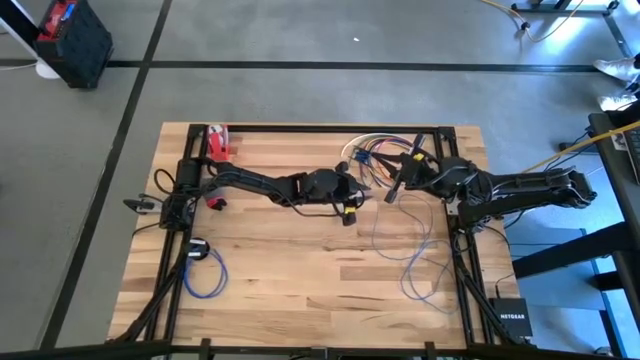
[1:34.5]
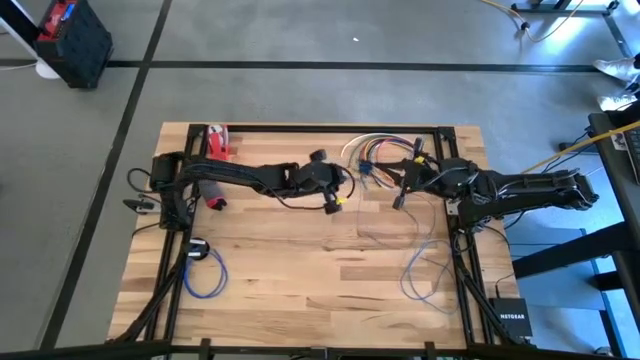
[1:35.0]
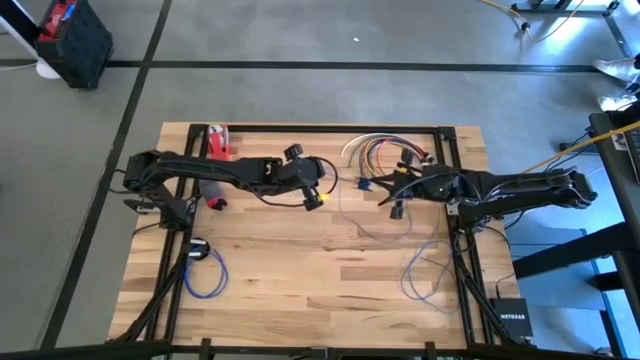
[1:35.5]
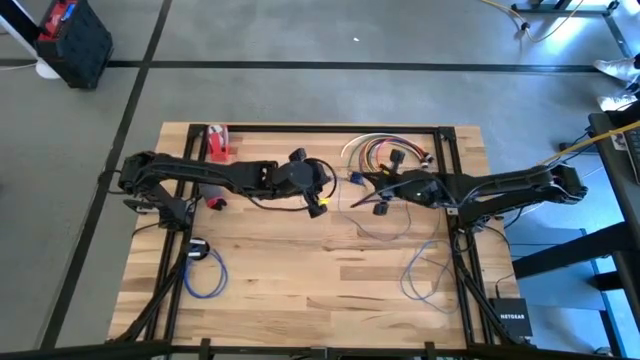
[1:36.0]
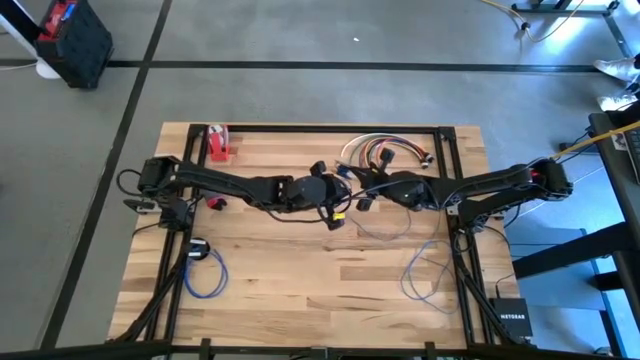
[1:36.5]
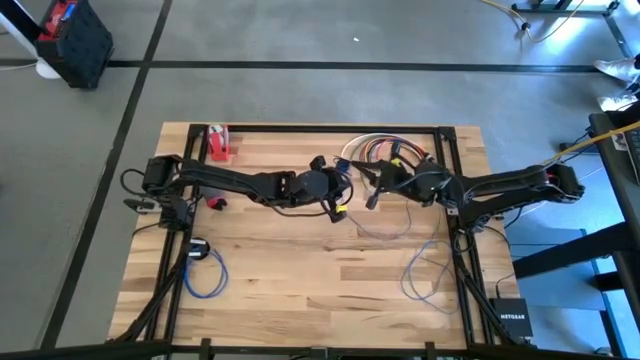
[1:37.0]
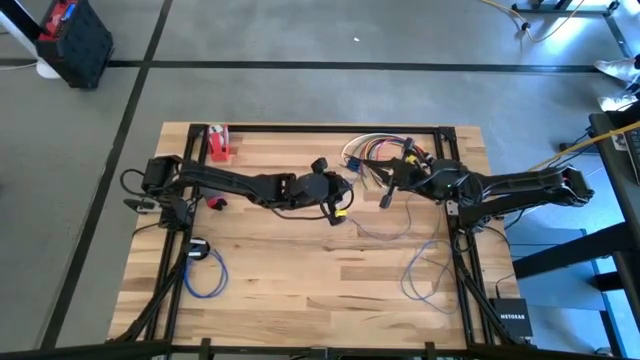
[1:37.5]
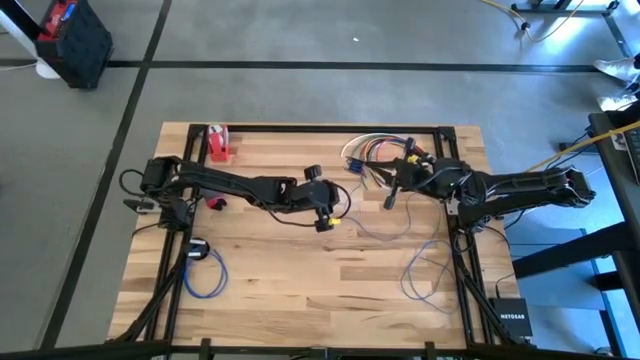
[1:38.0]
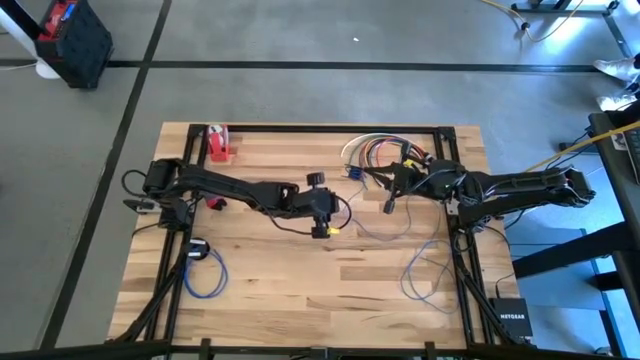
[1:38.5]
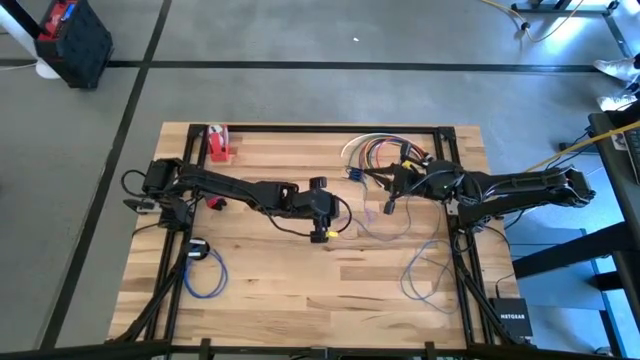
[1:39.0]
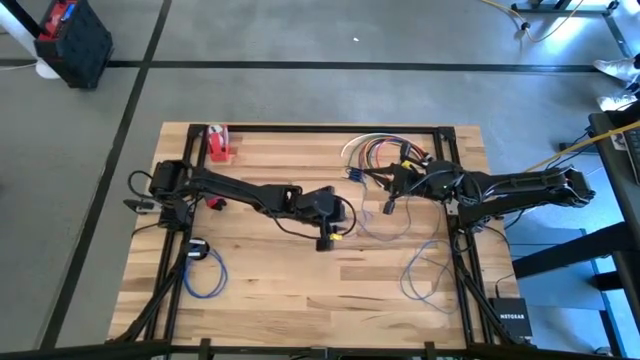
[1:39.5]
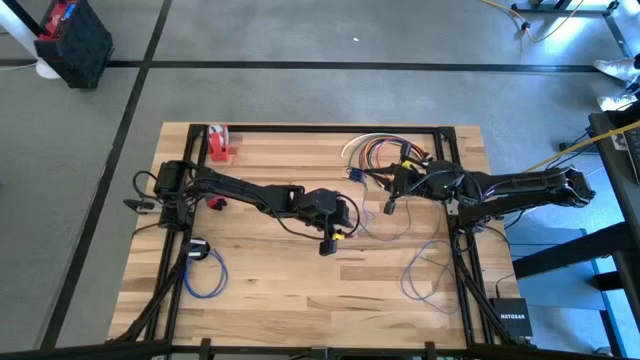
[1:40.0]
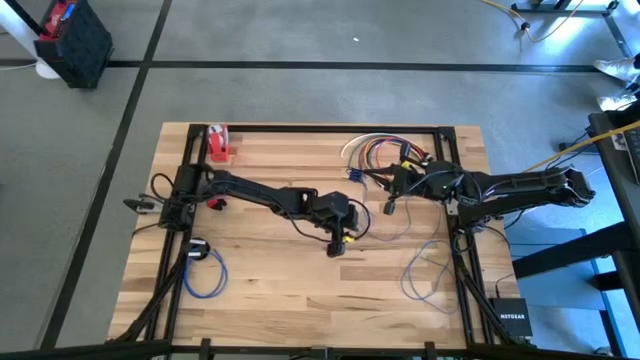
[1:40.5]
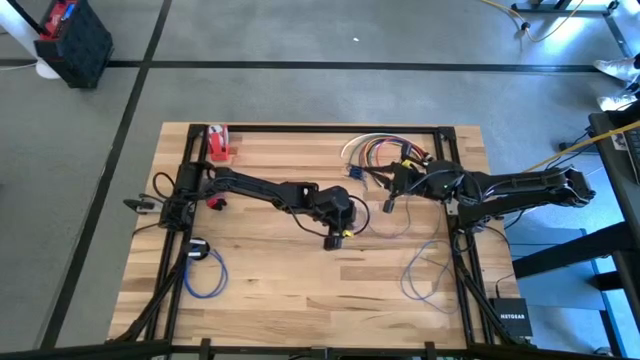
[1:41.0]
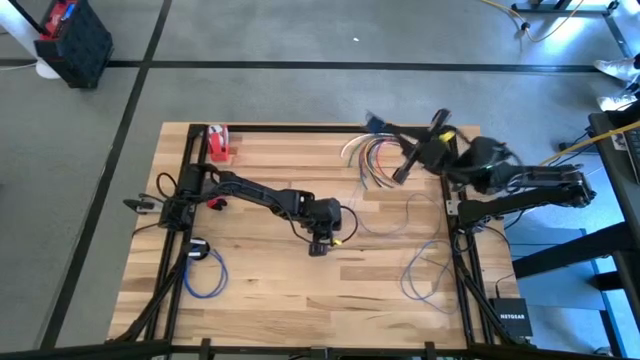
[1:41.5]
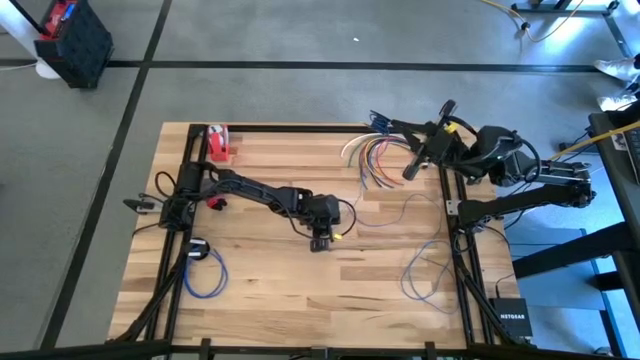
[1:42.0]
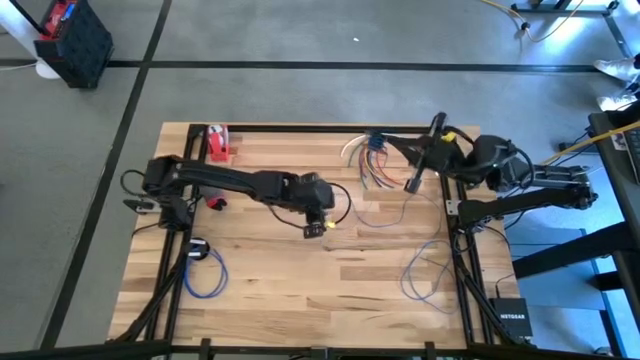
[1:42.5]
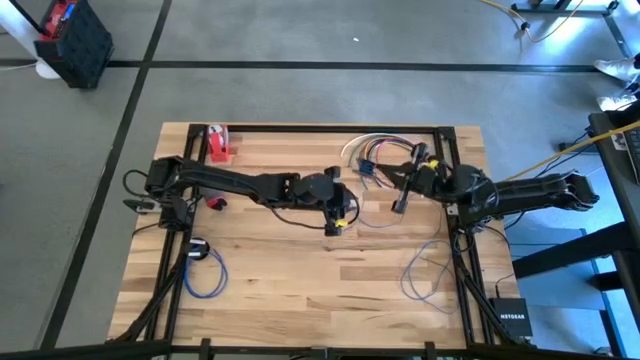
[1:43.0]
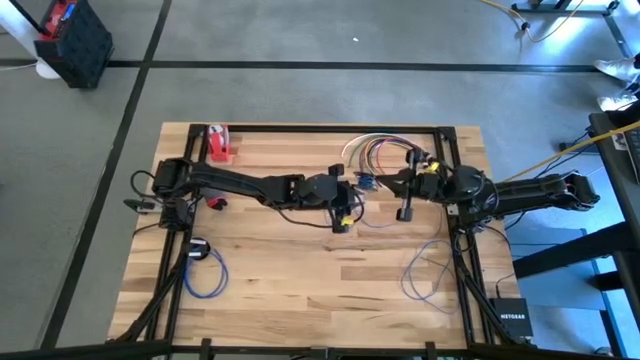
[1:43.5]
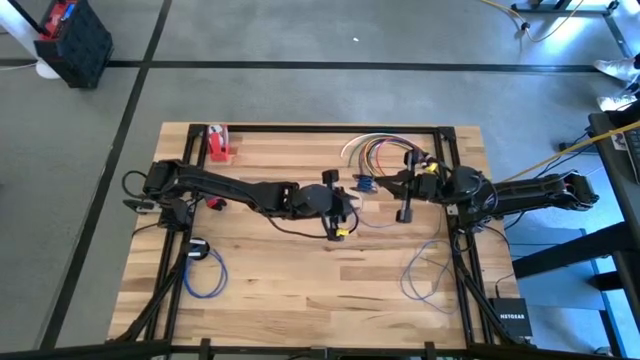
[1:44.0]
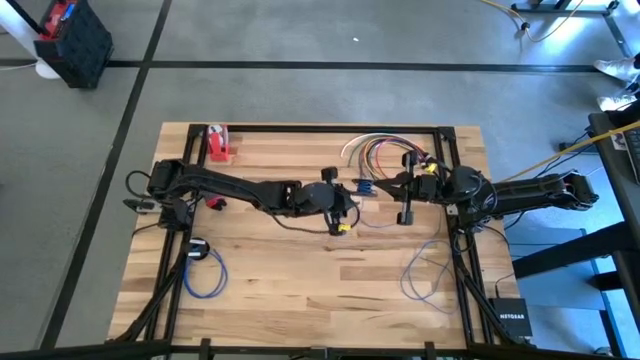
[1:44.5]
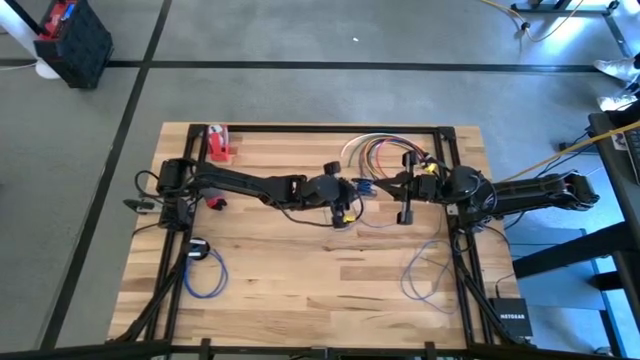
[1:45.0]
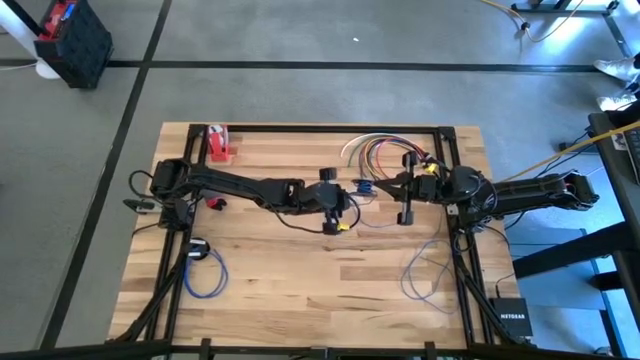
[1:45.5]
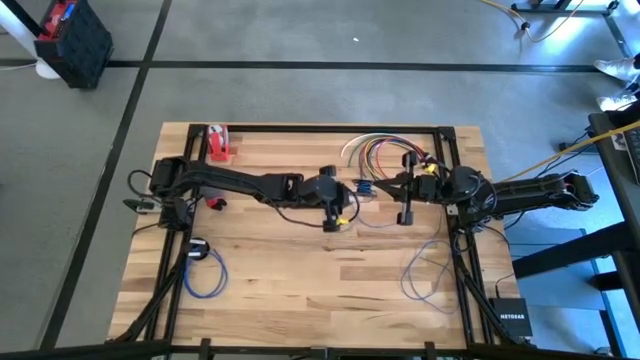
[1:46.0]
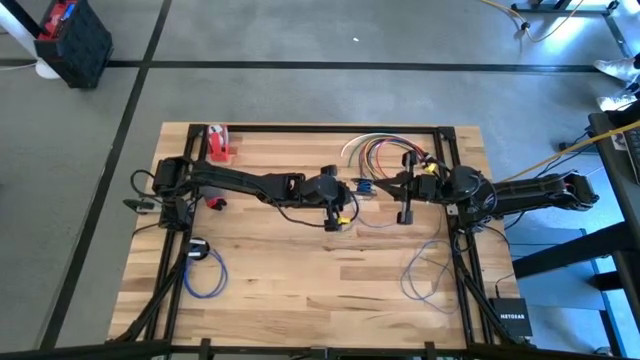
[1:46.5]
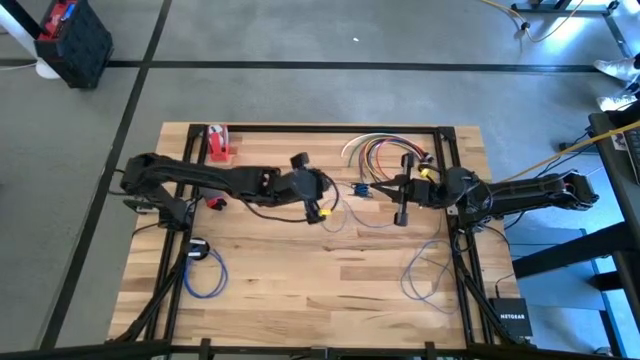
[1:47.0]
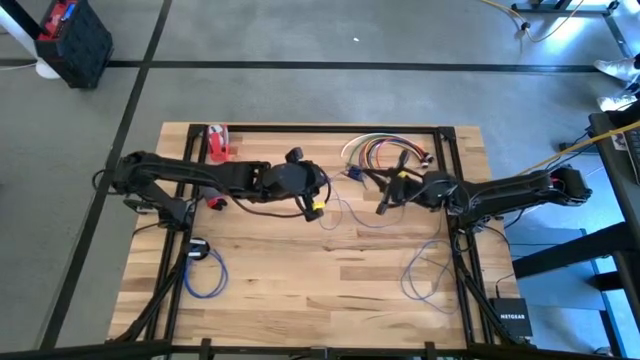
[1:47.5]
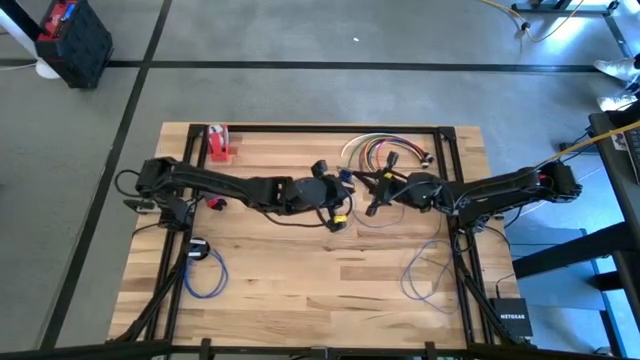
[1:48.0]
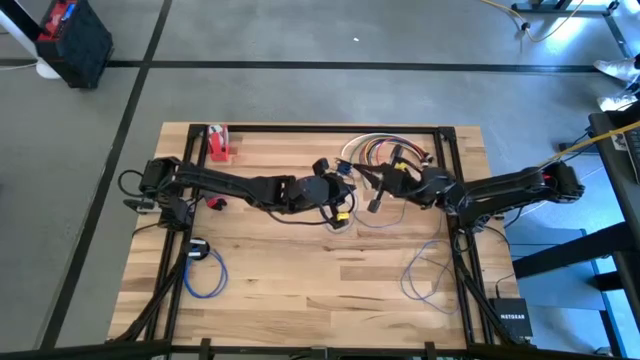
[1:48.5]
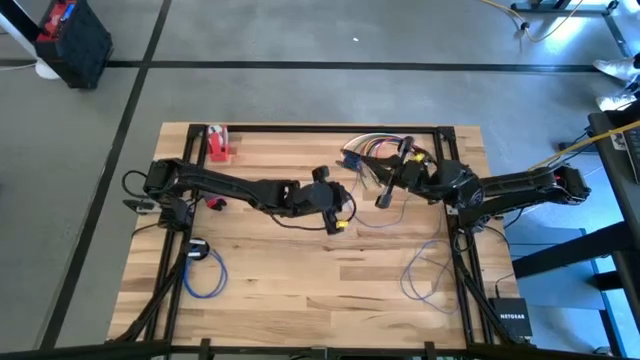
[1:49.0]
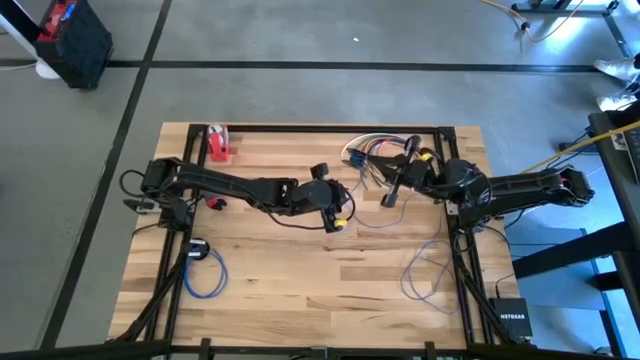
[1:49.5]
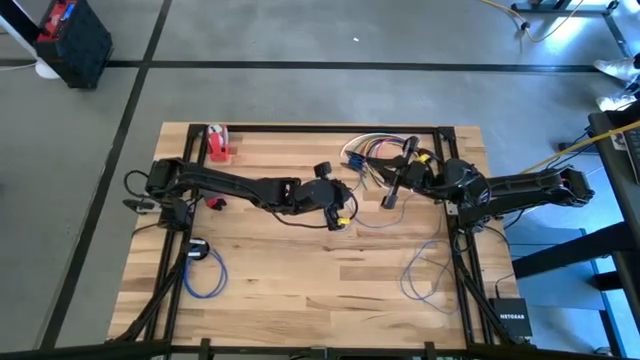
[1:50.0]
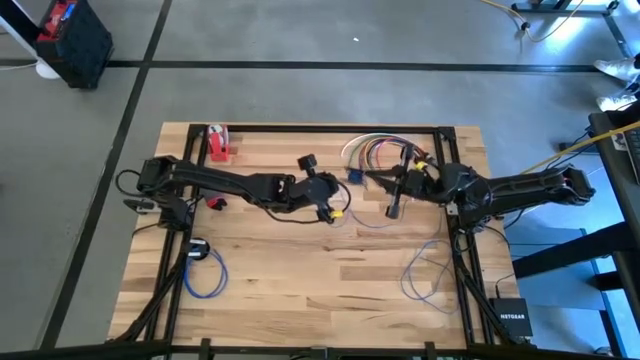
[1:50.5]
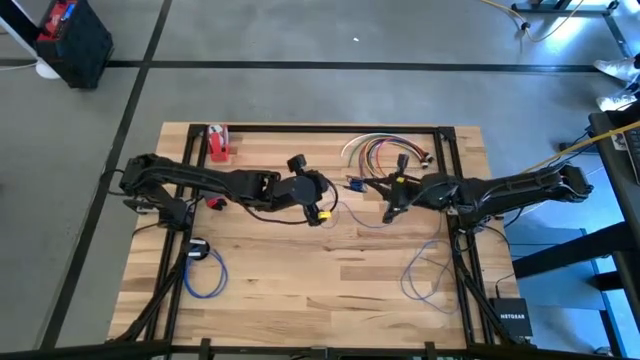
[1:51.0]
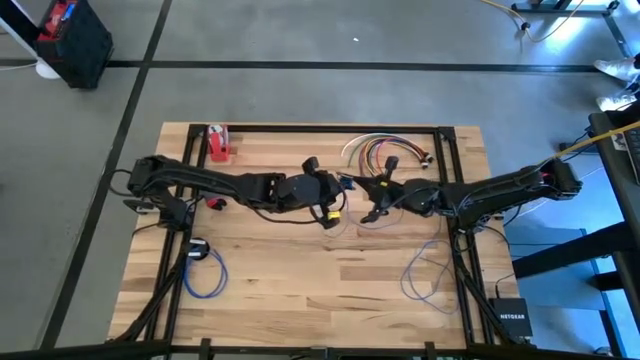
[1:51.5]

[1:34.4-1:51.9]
Task: Coil cords
Coil the blue cable wire on the black spool

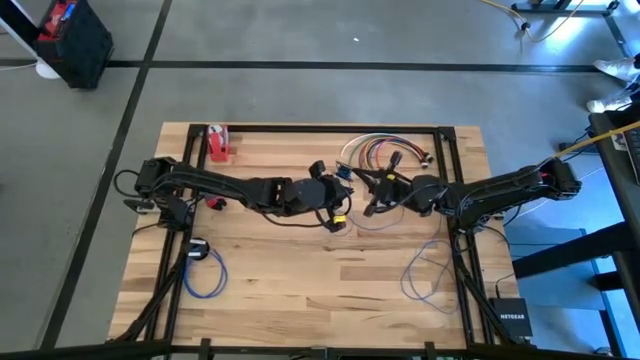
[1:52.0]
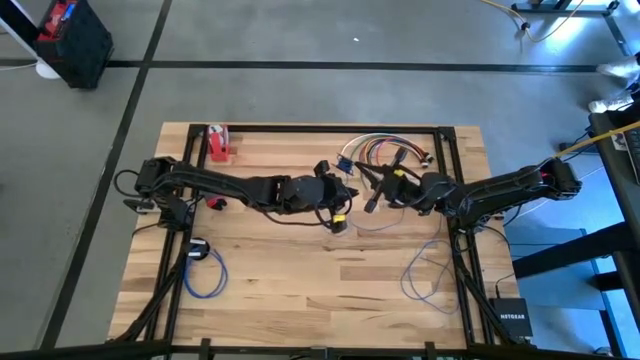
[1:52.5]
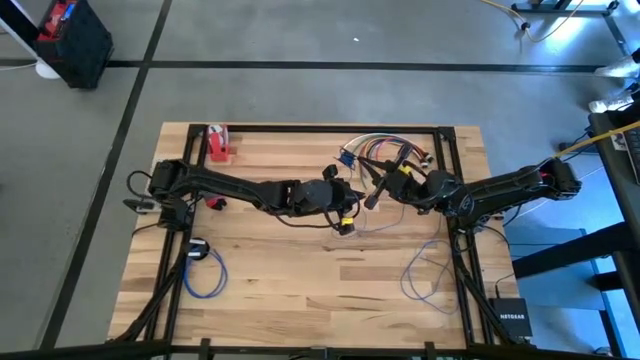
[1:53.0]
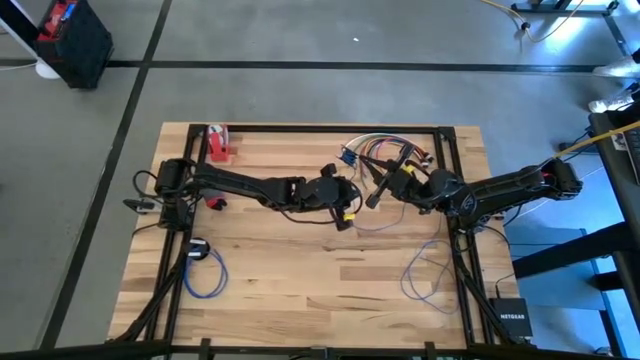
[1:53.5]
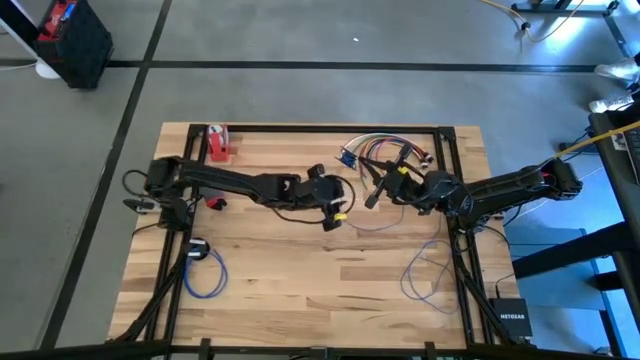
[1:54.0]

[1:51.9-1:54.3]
Coil the blue cable wire on the black spool

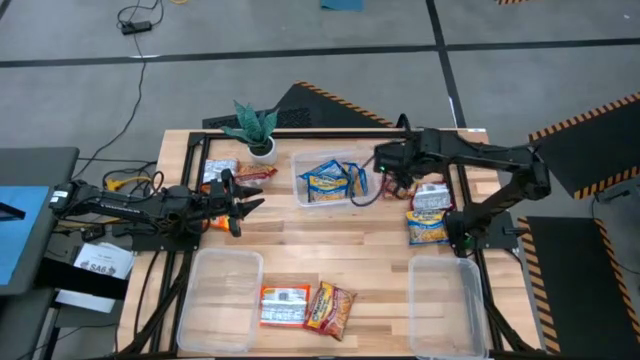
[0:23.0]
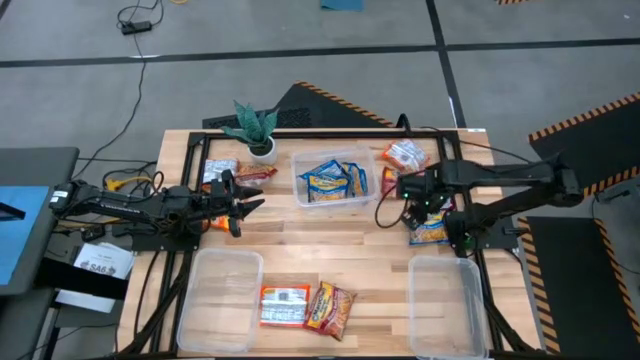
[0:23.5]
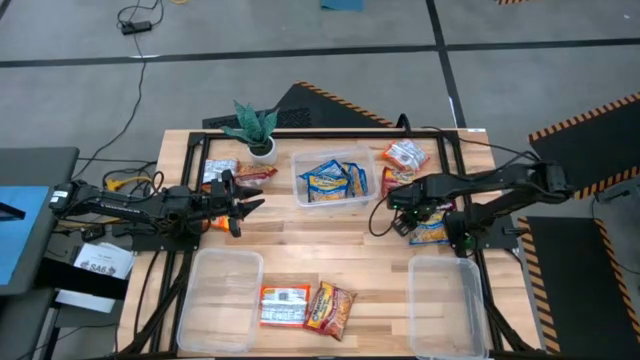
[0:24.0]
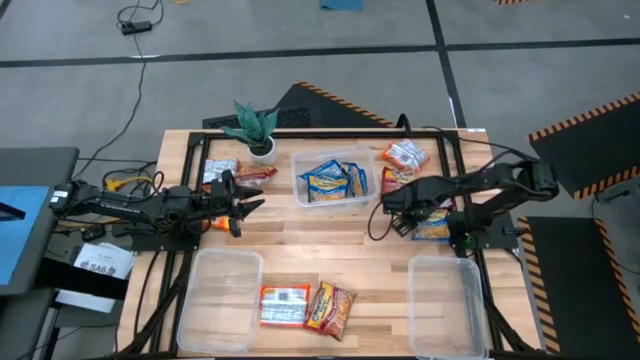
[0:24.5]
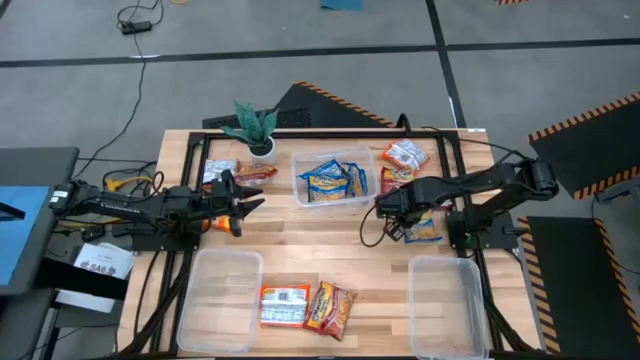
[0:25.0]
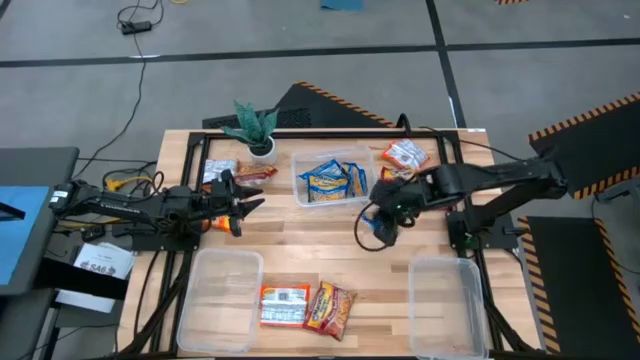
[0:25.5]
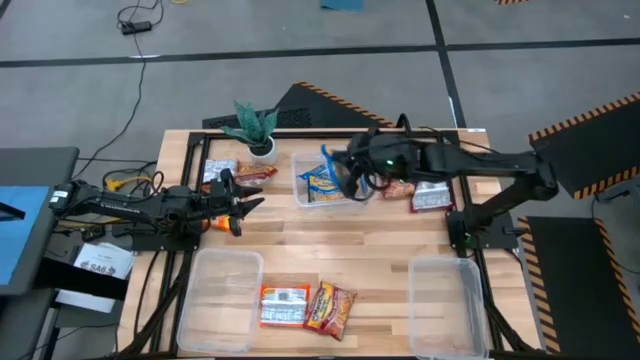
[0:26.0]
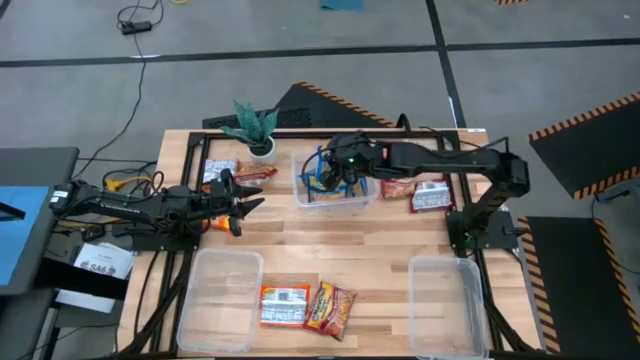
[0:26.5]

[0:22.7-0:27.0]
Task: Sort Maruchan noodles
Put the blue noodle packet into the top transparent bin
